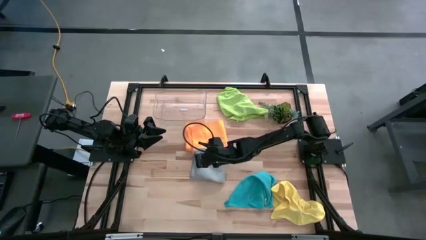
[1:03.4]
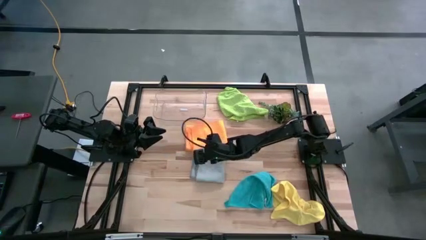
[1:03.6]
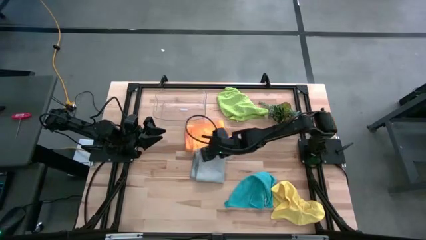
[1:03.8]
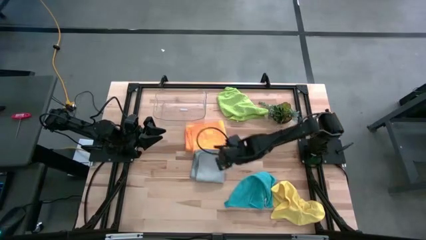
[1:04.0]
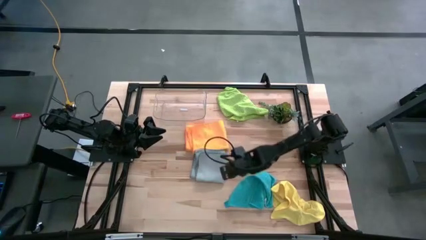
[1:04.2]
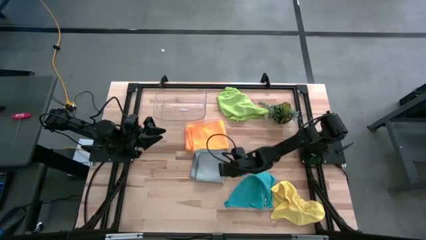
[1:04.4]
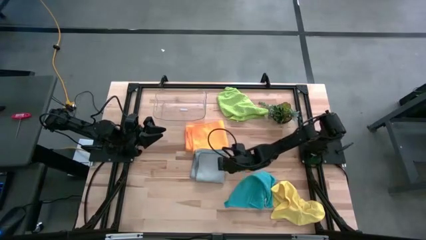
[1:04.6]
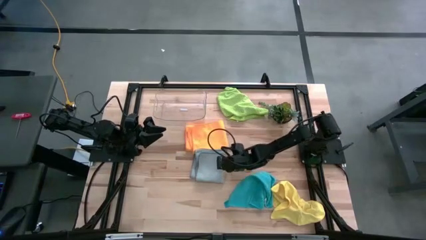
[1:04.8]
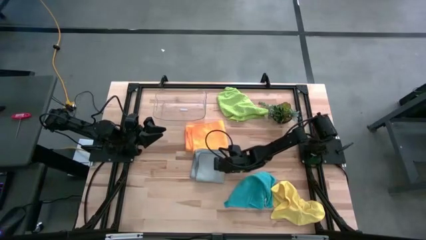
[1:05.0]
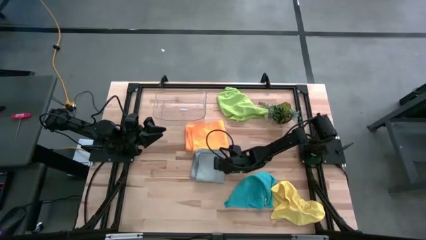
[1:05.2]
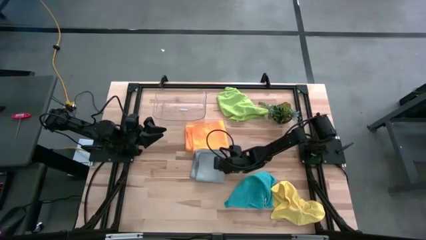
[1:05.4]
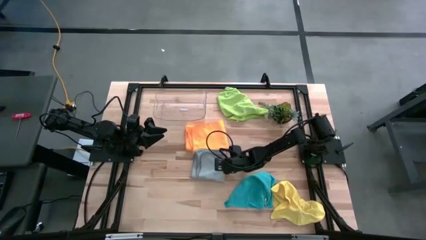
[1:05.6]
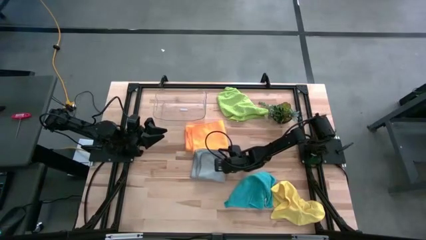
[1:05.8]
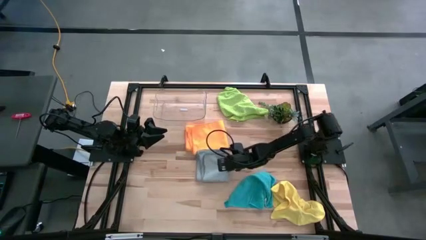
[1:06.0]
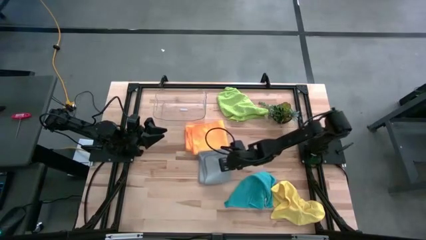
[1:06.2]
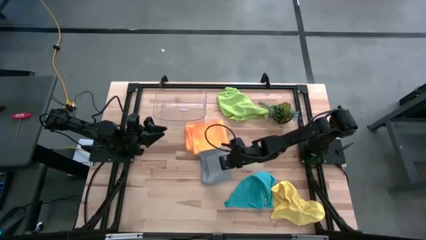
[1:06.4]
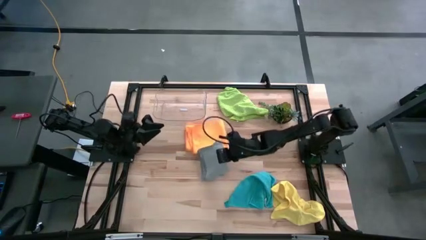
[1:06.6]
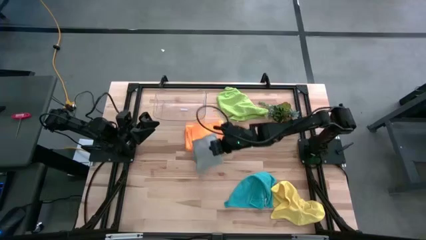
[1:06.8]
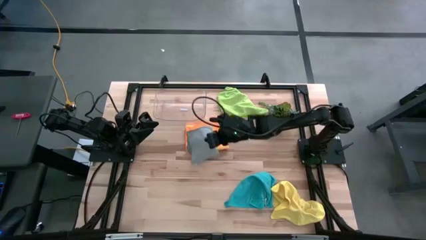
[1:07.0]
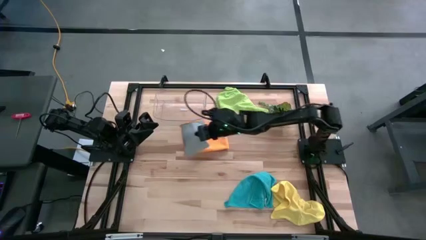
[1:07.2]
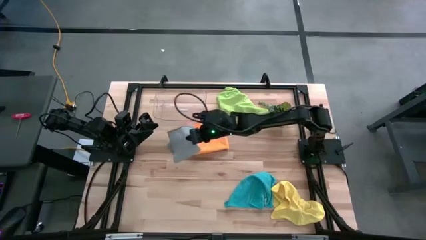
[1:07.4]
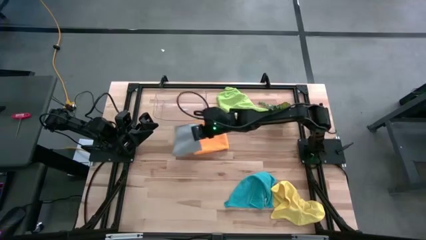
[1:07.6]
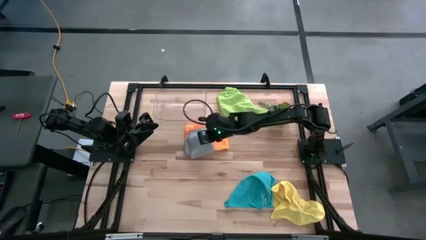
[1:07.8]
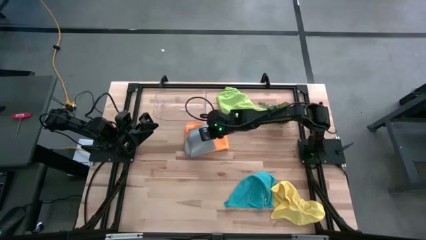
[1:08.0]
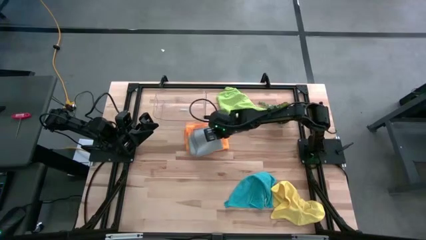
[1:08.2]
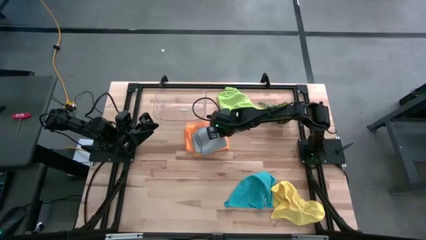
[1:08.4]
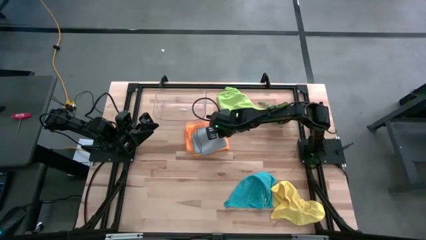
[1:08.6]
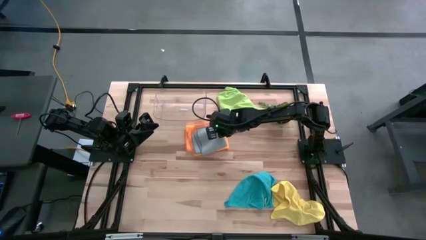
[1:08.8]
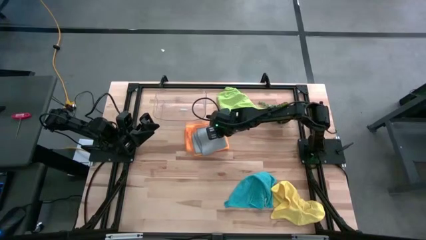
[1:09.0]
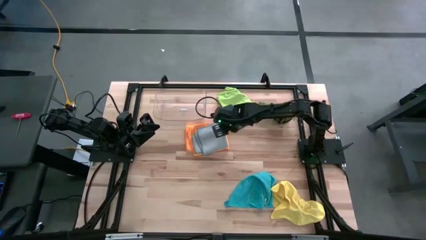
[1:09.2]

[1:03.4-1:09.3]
Task: Fold microfiber towels
Stack the gray towel on the orange towel

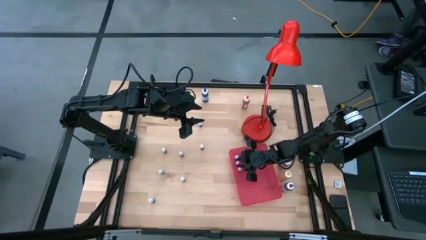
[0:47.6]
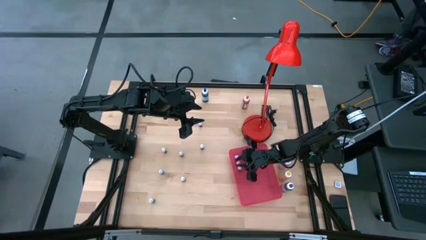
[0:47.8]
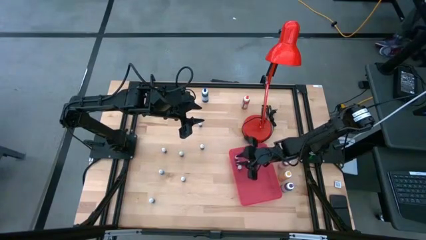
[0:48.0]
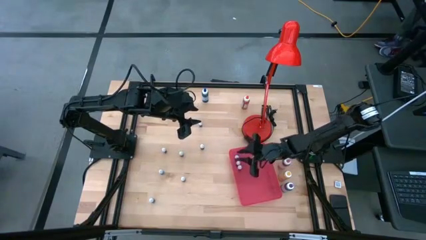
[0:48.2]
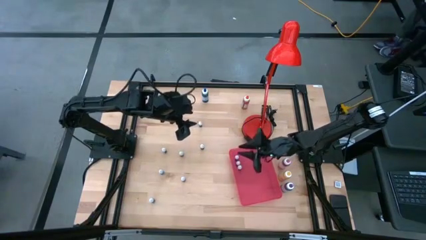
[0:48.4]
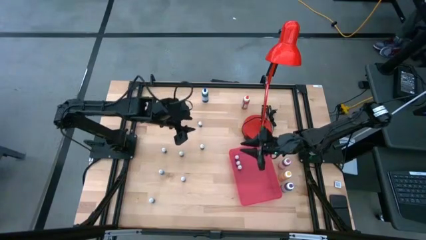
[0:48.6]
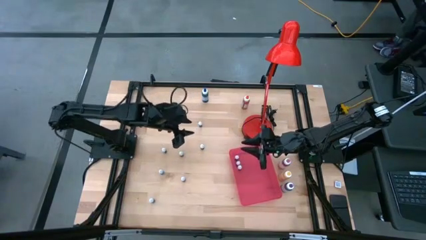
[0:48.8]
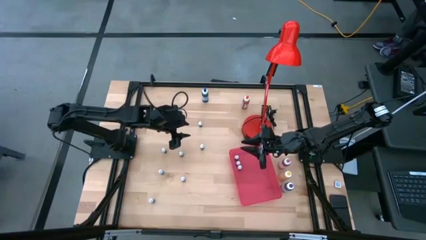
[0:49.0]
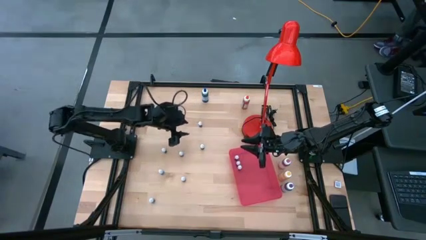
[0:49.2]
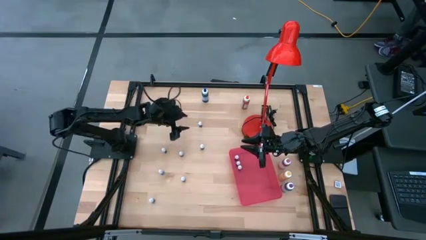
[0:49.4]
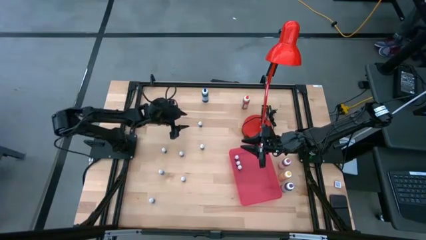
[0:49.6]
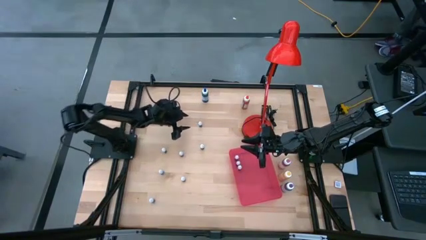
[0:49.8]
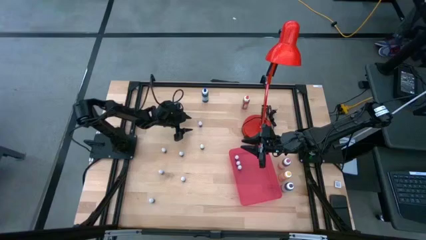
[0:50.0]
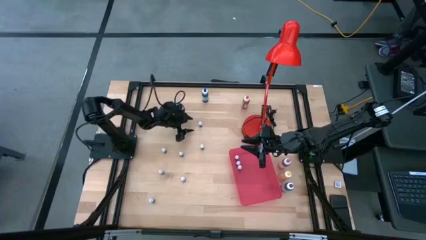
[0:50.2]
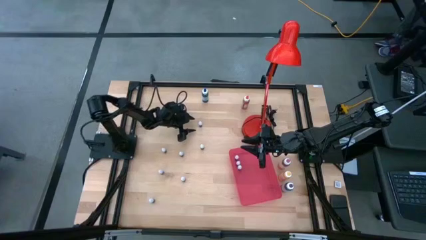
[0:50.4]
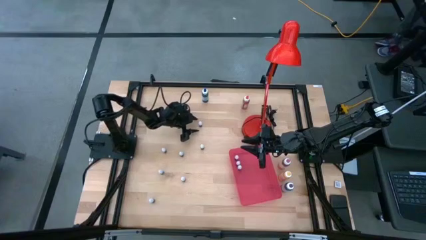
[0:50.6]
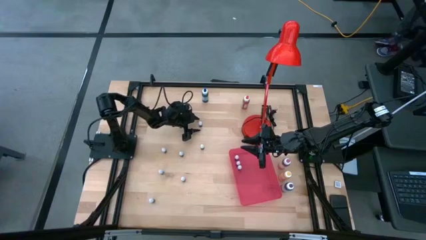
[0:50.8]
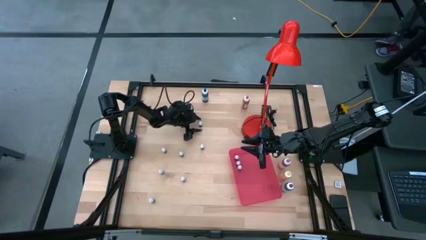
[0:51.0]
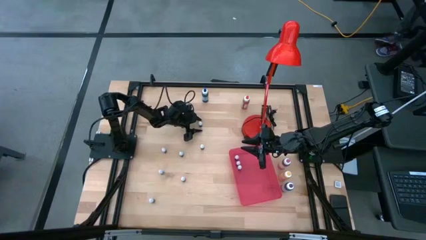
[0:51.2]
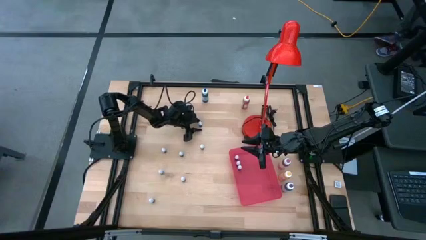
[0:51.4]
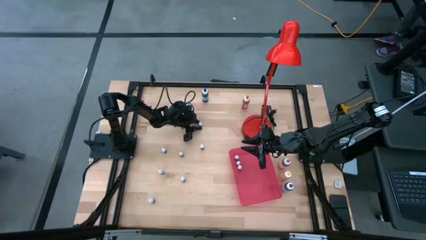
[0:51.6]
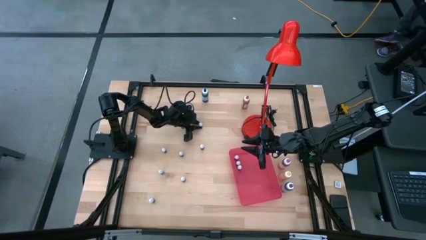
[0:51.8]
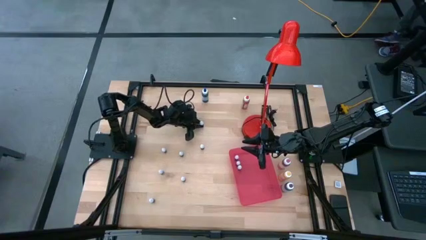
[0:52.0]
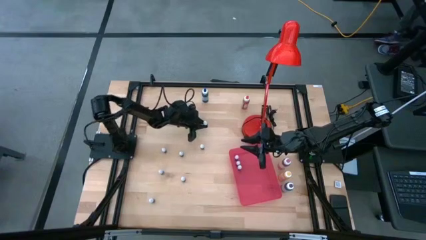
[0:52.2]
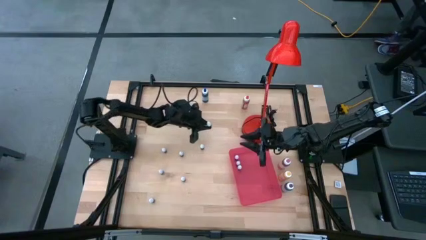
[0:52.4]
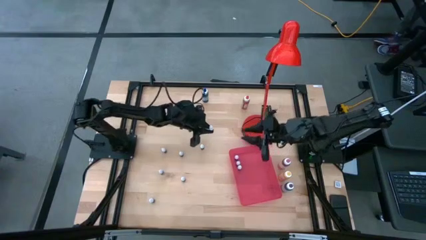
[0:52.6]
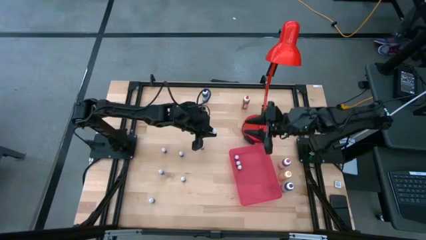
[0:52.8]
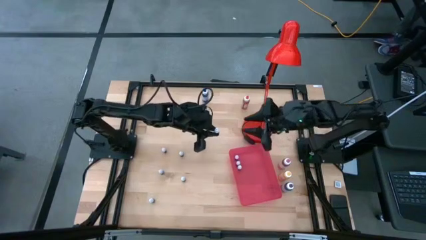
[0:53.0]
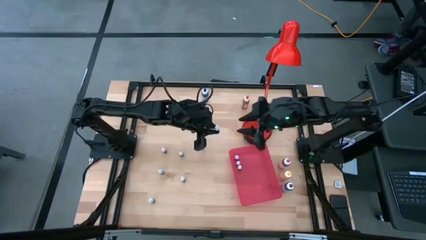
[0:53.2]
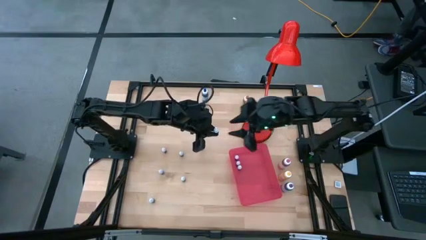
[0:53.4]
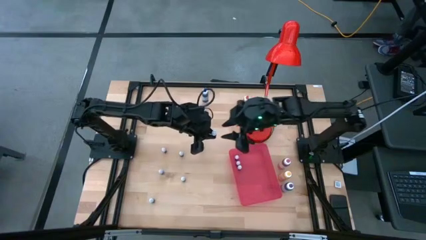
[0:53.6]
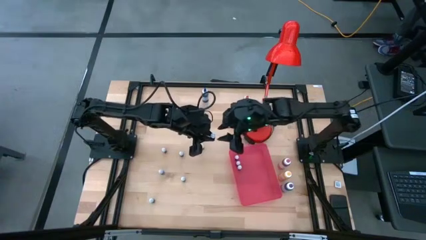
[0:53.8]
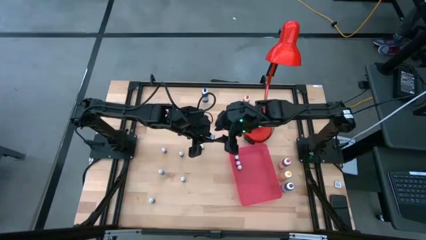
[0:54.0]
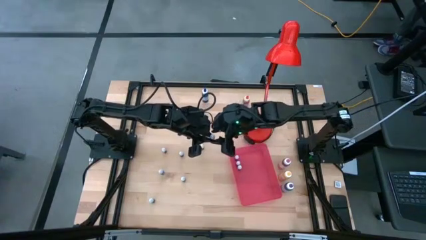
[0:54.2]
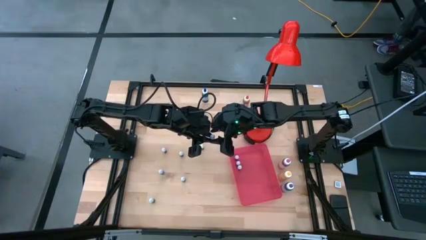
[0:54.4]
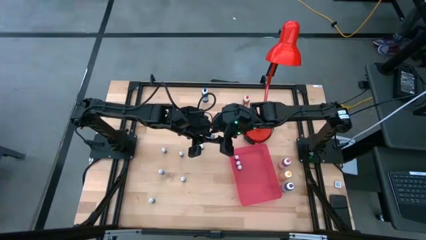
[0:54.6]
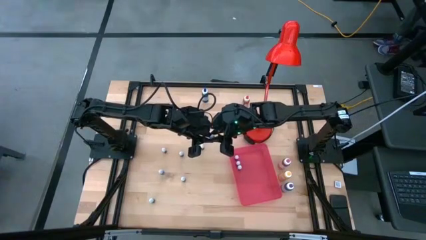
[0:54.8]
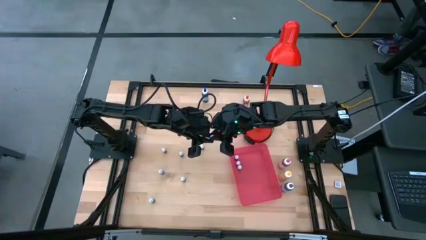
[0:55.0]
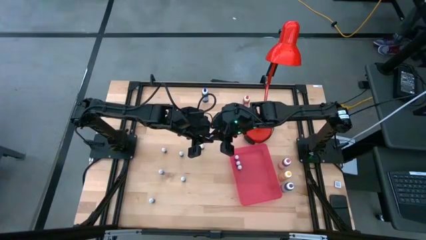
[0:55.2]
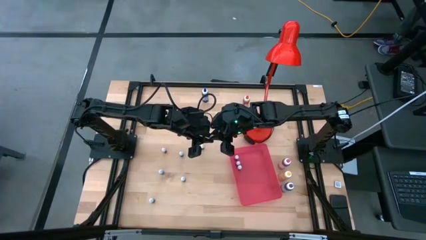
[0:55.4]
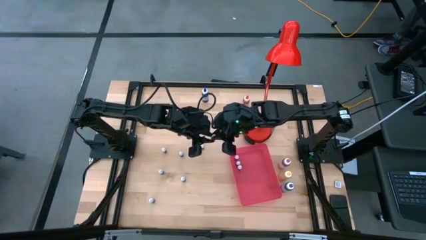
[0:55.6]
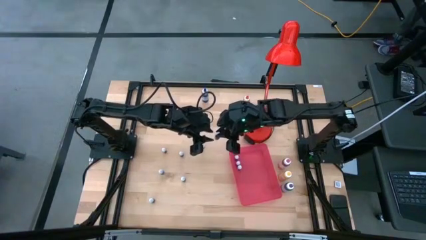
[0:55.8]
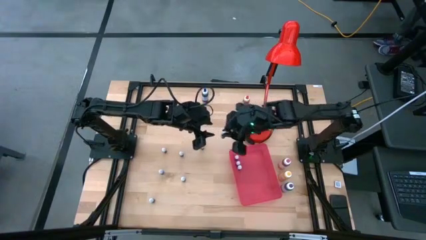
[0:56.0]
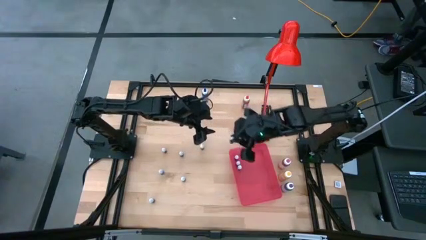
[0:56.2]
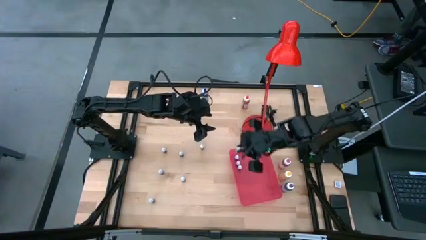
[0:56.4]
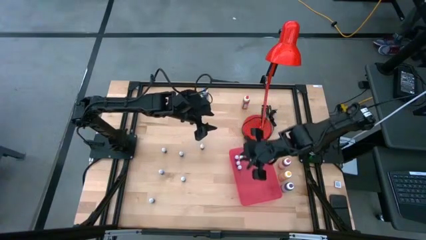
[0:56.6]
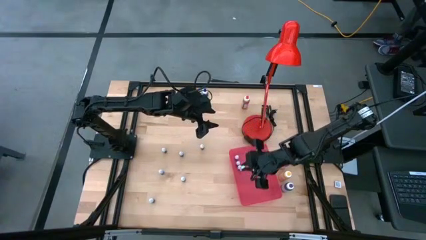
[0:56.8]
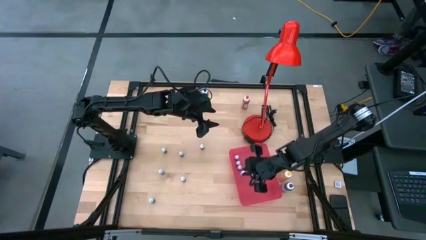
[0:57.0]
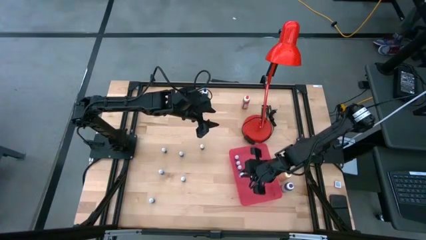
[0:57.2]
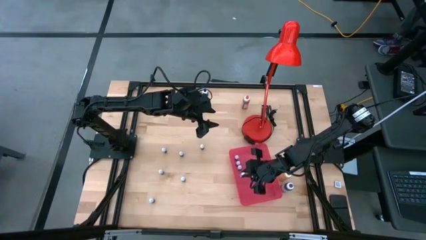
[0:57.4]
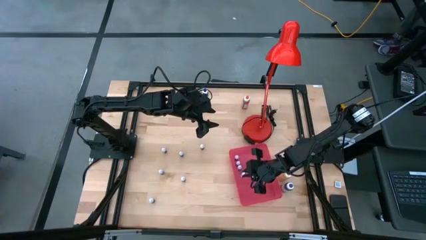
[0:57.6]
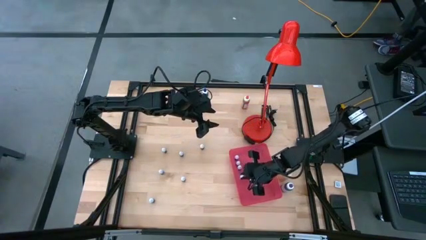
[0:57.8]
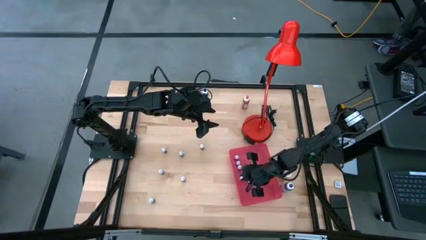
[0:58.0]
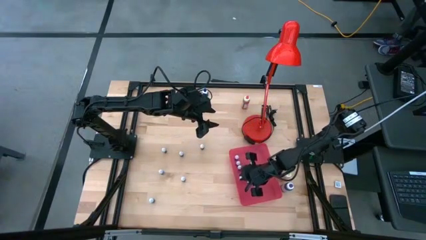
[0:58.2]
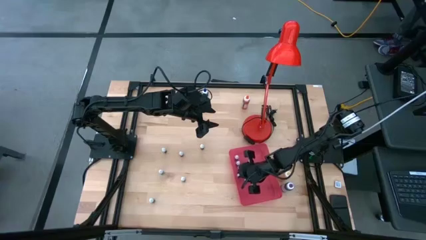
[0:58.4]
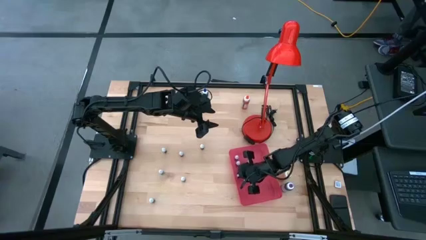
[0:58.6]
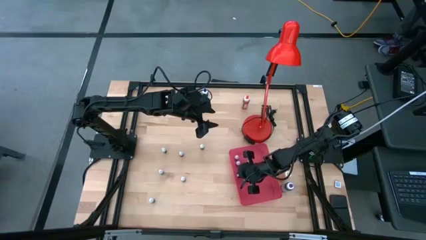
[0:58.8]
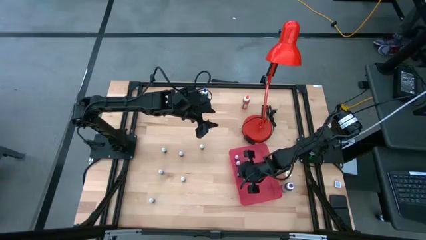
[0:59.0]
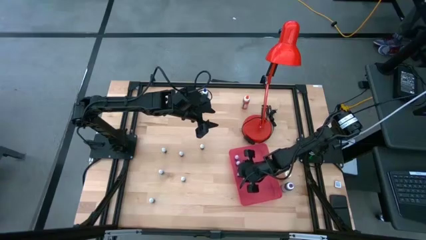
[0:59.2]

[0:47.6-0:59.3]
Task: Pick & Place food coloring
Put the small black food coloring bottle into the red bin
